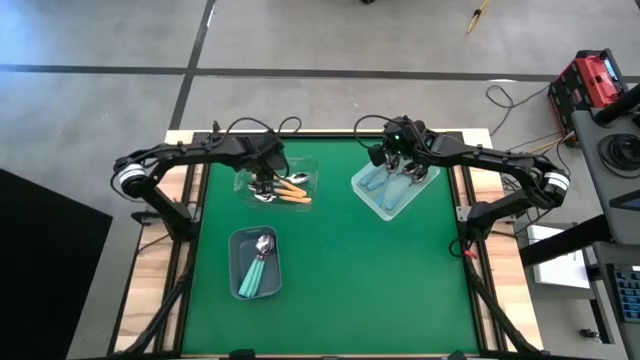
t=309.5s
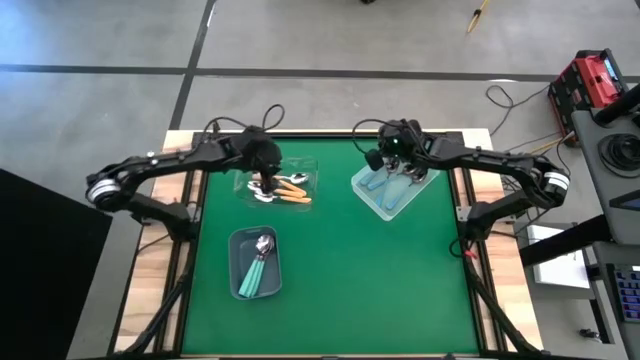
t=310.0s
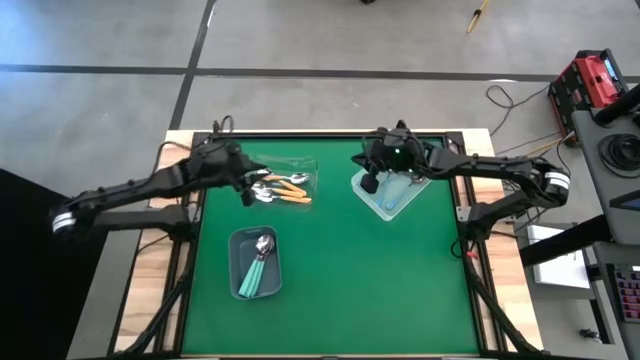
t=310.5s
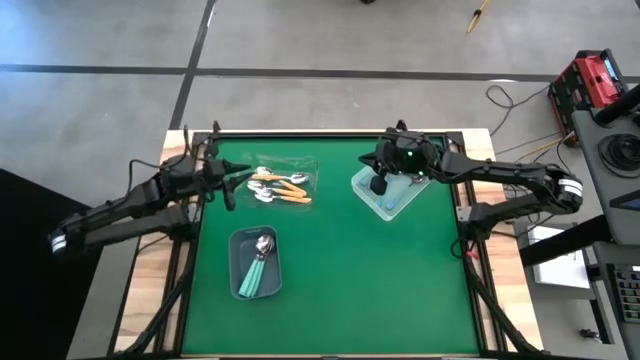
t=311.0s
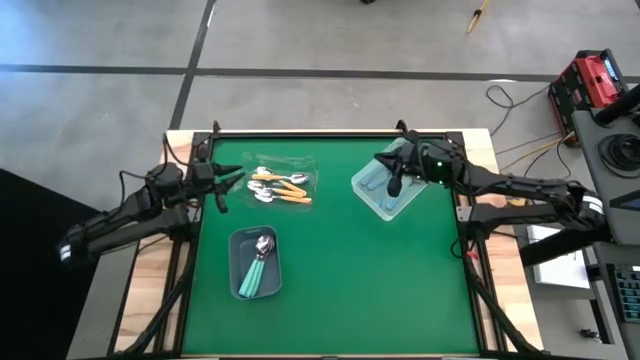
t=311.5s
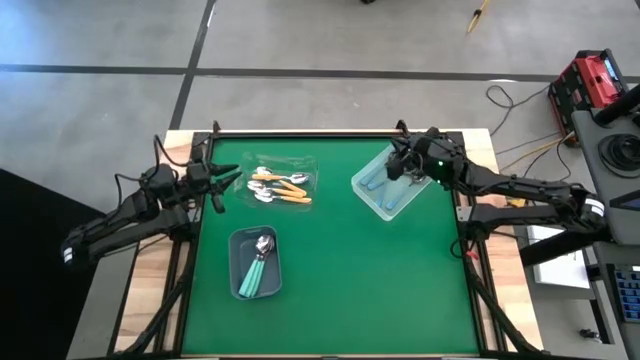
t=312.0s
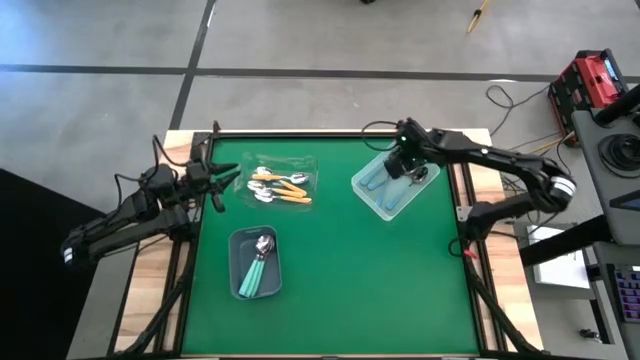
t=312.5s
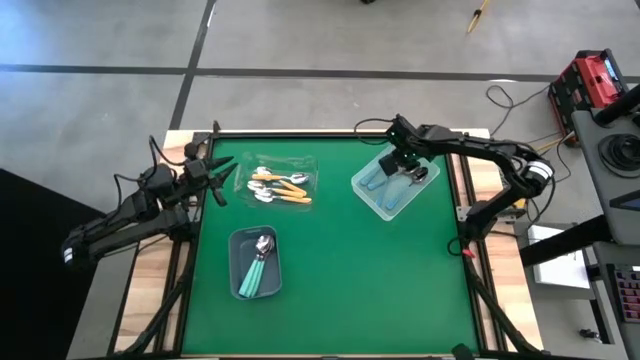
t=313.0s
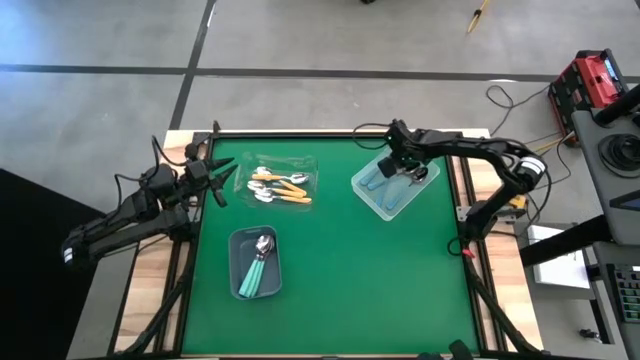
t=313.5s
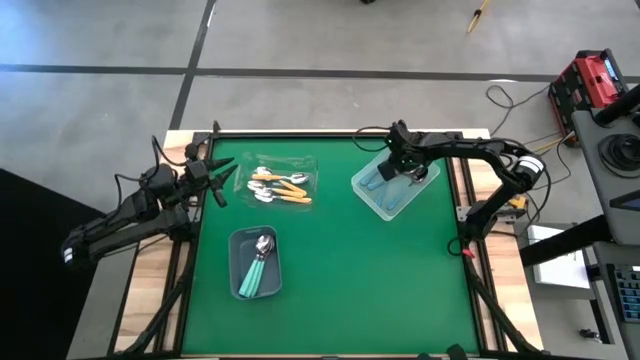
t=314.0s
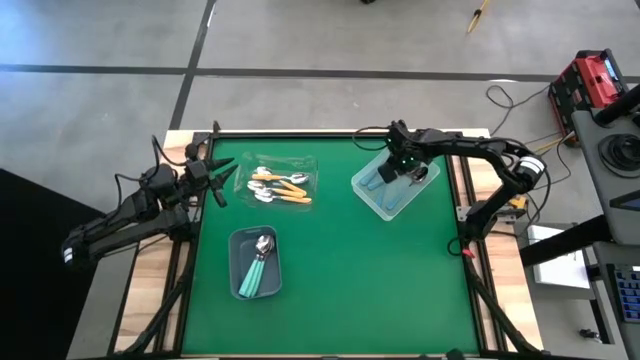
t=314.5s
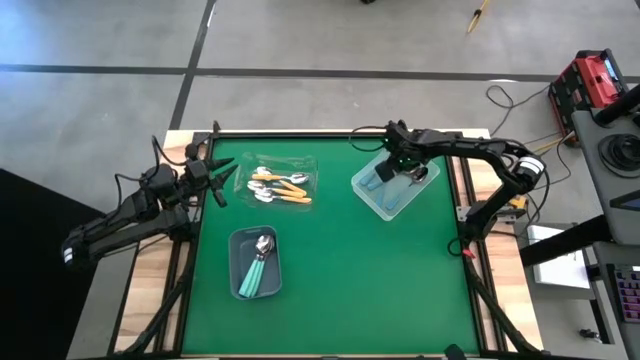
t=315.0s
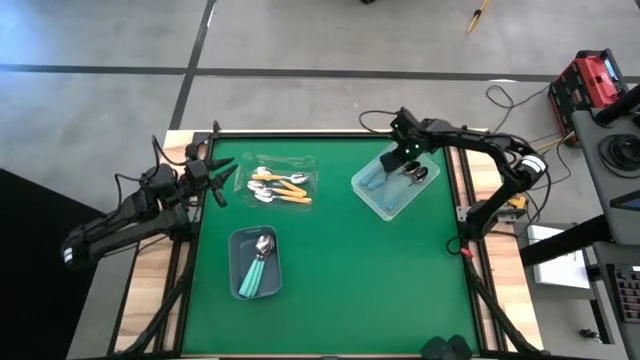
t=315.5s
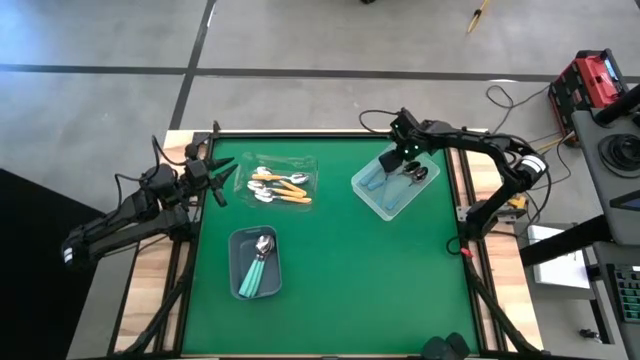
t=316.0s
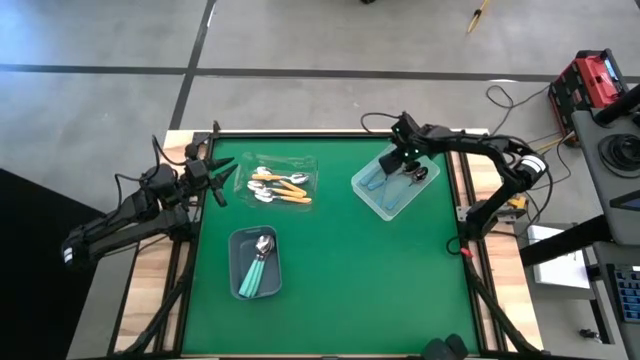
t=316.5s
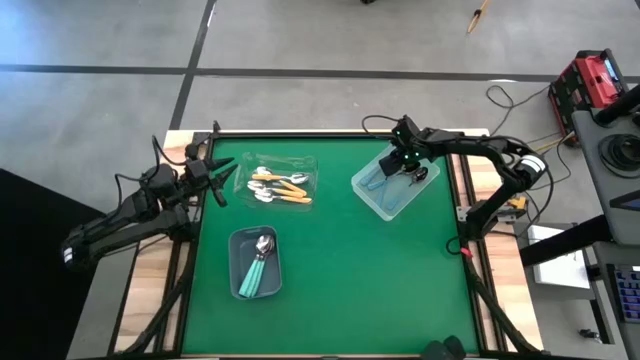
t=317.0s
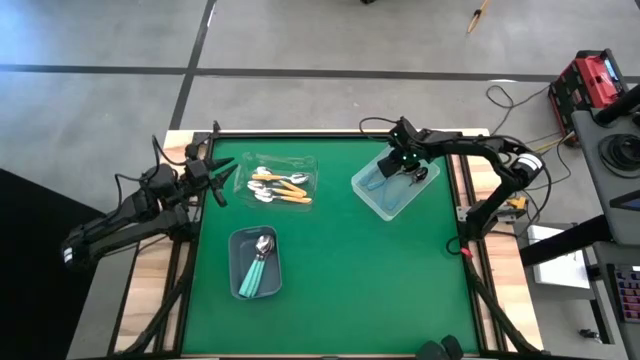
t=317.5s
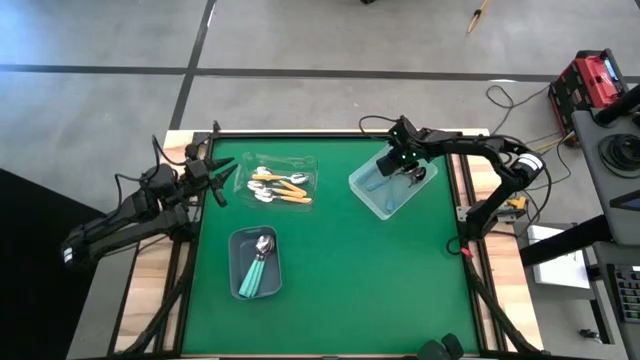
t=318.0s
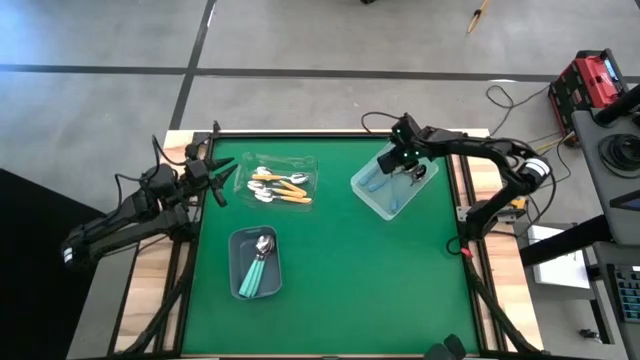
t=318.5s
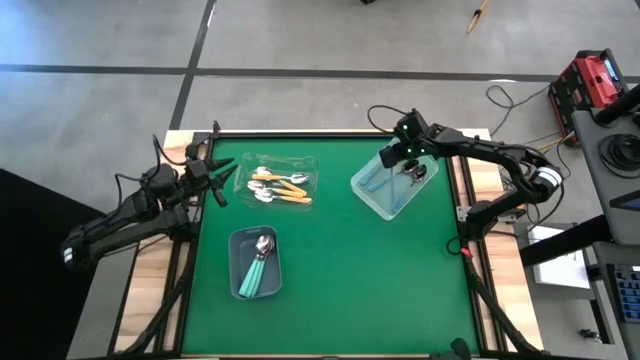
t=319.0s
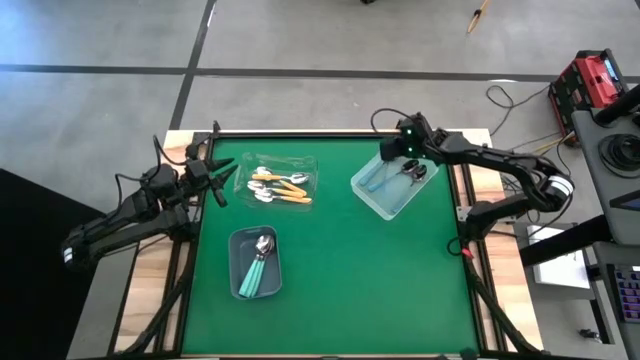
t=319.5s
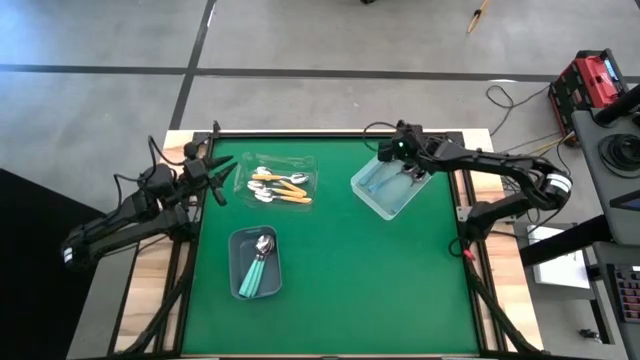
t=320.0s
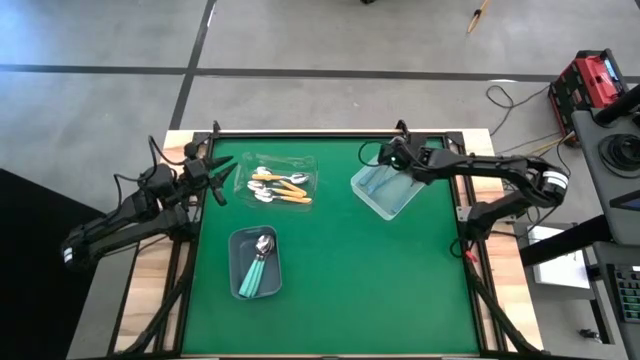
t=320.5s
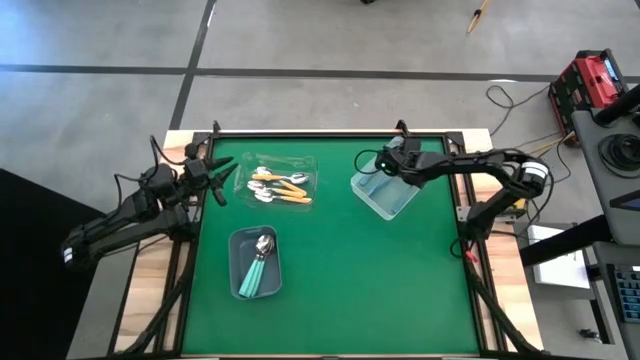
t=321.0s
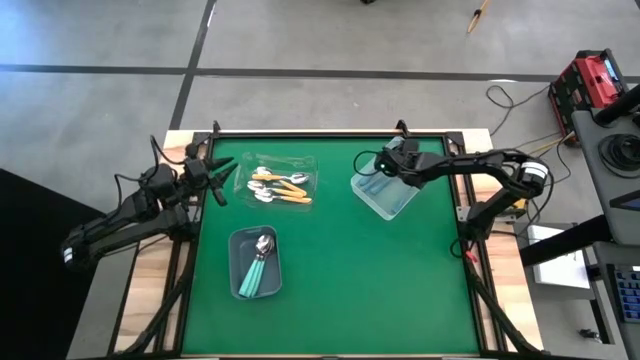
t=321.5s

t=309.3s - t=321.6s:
Task: Sort silverware by color (type)
Adjust the blue spoons in the white bin

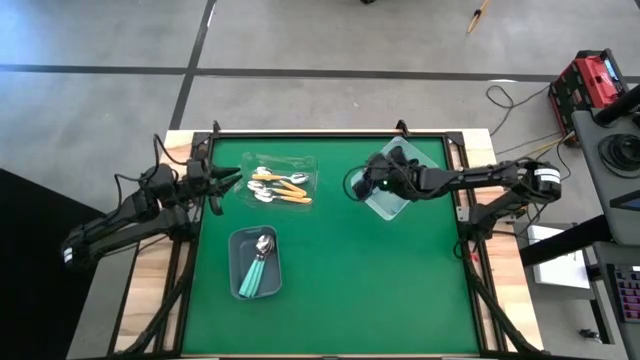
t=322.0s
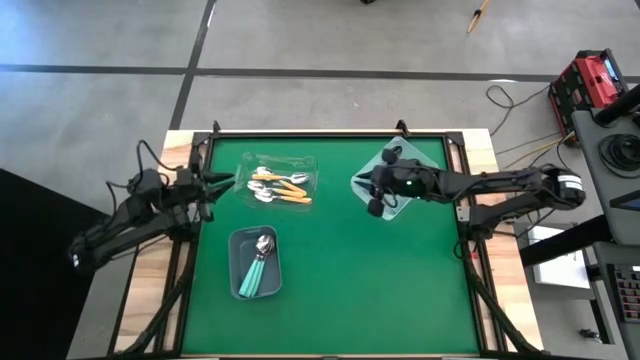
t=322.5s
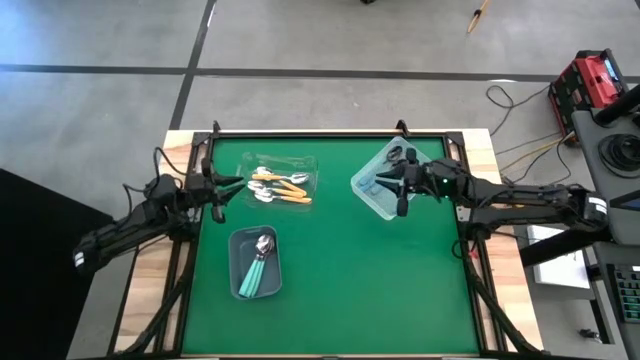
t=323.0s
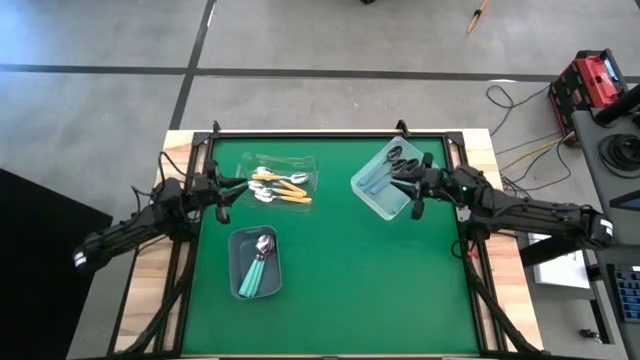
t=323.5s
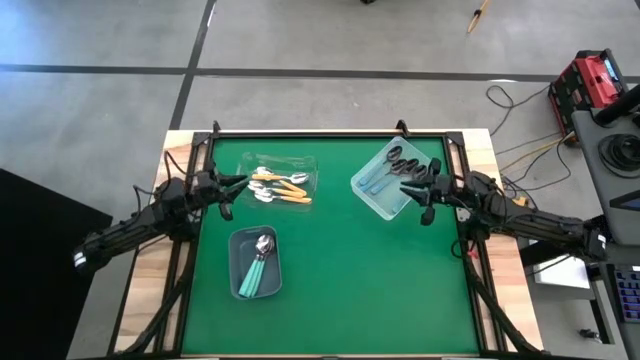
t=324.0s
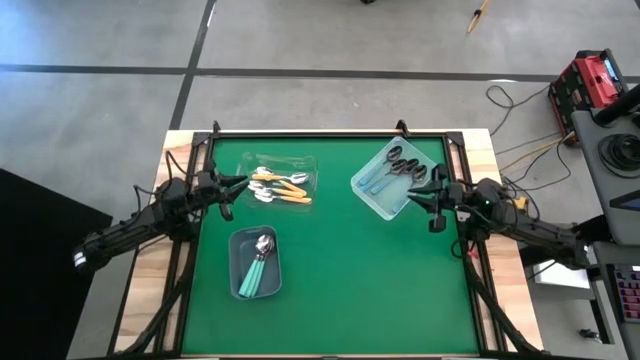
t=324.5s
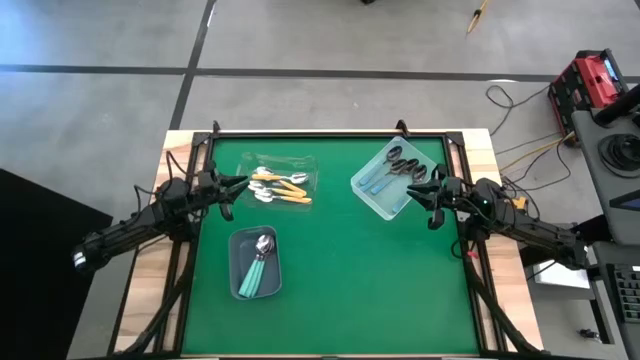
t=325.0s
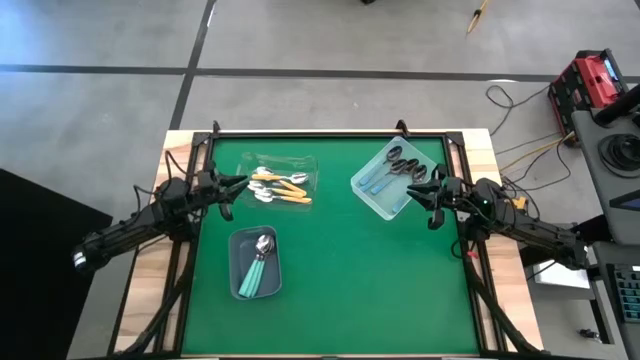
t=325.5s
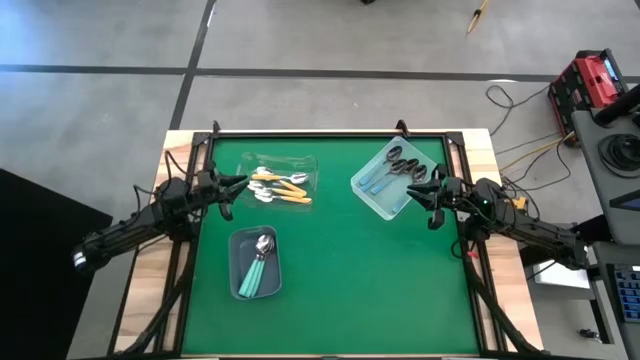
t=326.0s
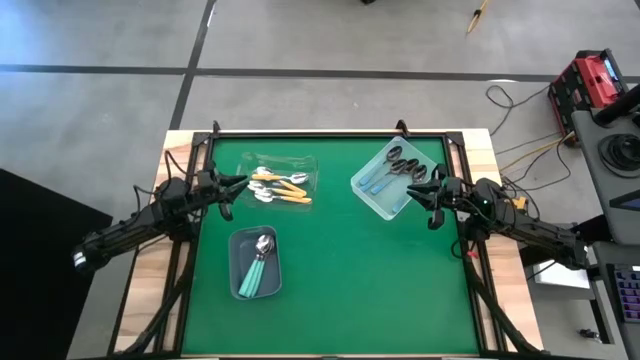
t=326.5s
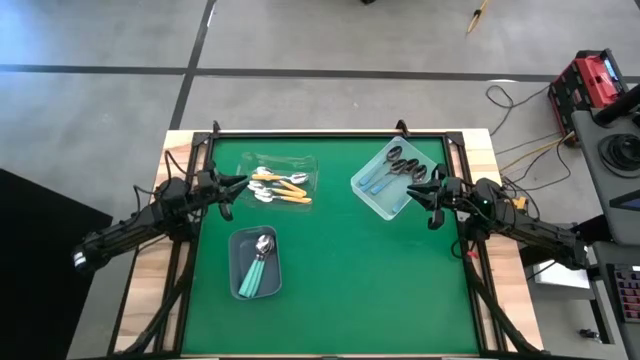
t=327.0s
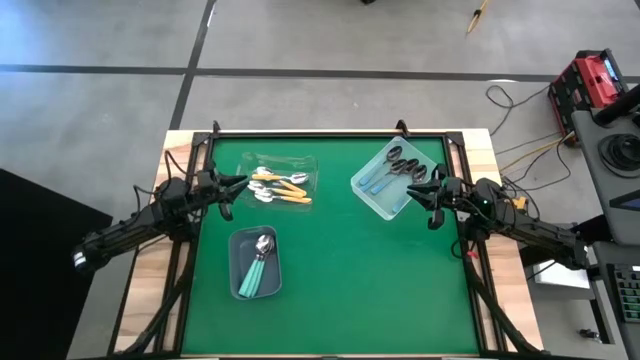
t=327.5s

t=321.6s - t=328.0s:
Return to Home Position
